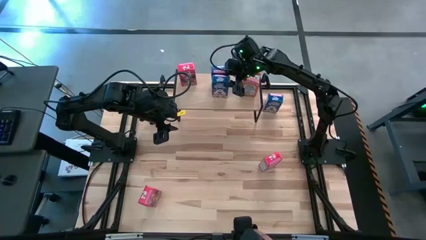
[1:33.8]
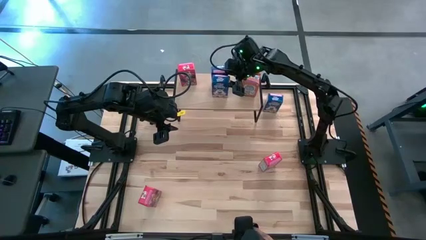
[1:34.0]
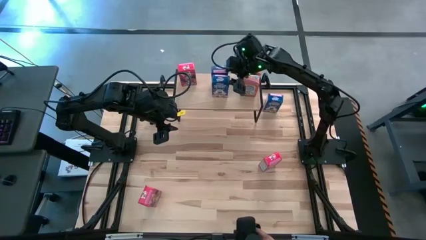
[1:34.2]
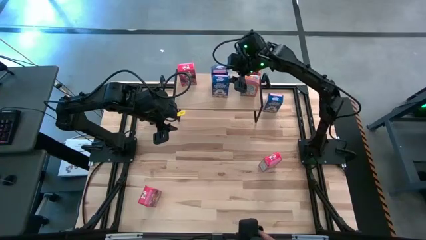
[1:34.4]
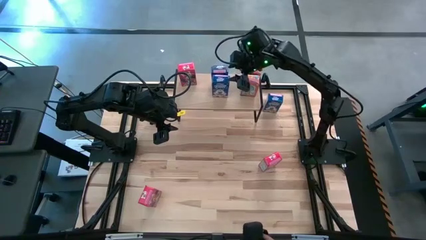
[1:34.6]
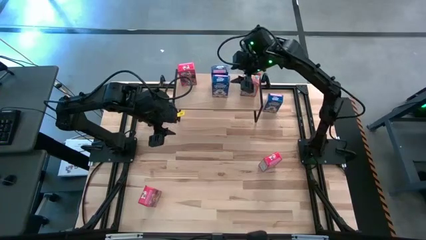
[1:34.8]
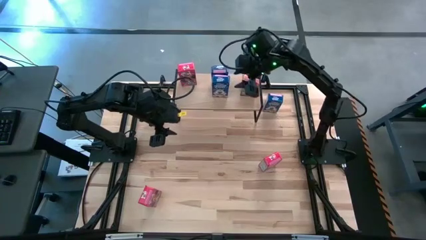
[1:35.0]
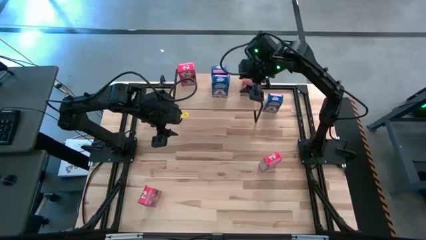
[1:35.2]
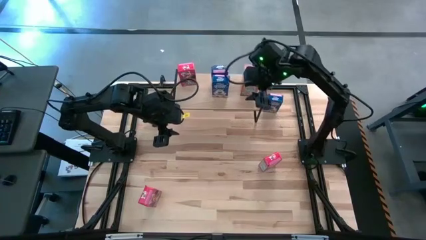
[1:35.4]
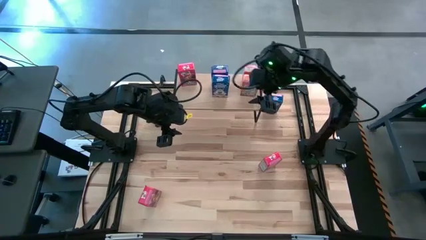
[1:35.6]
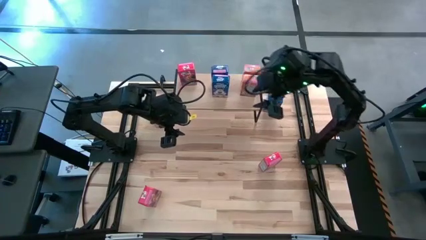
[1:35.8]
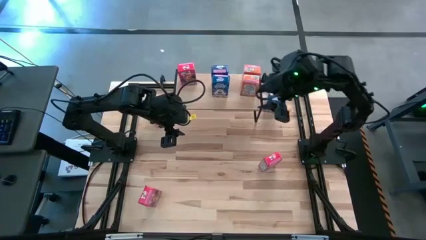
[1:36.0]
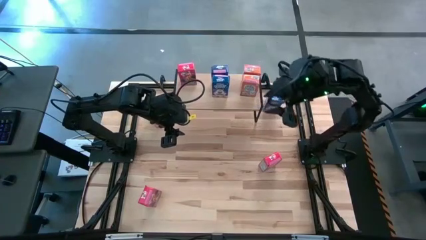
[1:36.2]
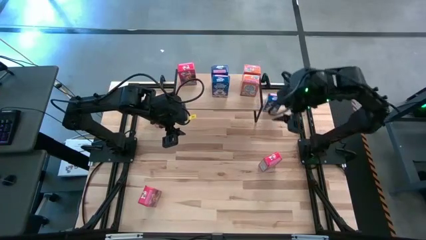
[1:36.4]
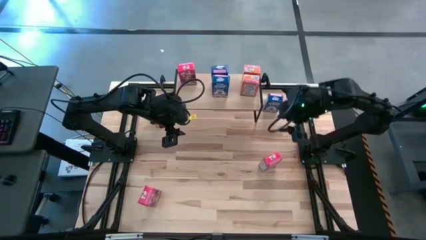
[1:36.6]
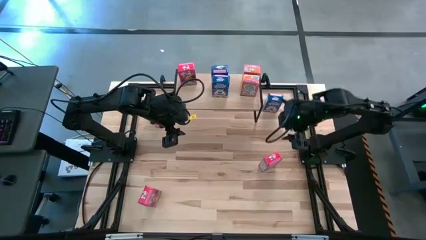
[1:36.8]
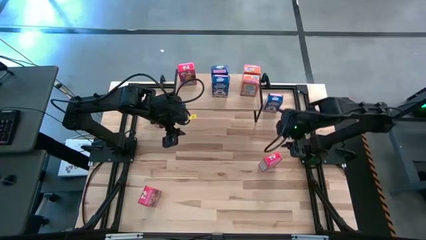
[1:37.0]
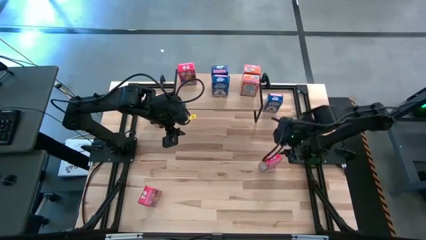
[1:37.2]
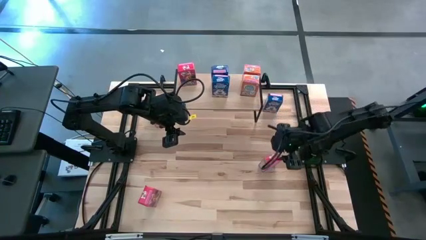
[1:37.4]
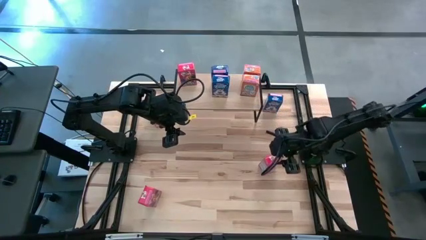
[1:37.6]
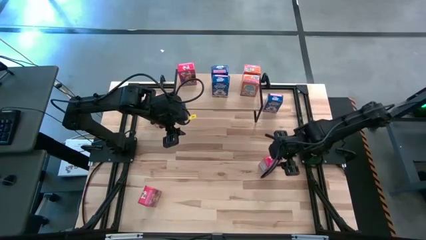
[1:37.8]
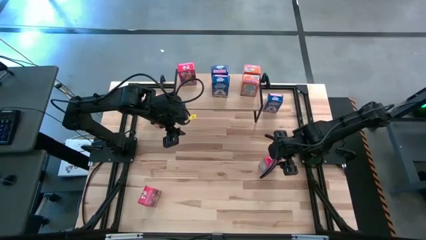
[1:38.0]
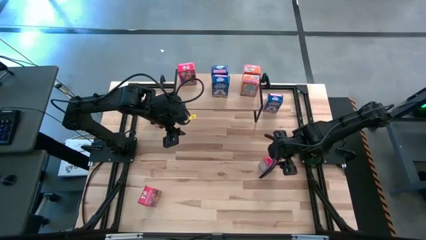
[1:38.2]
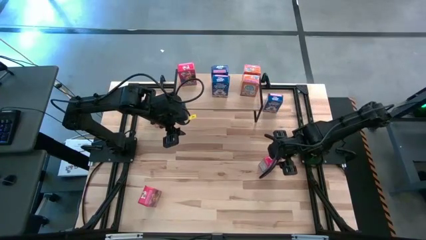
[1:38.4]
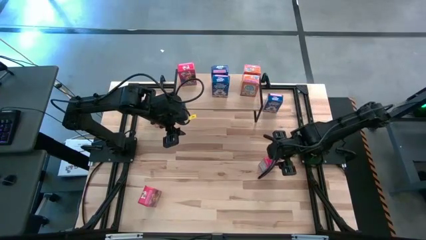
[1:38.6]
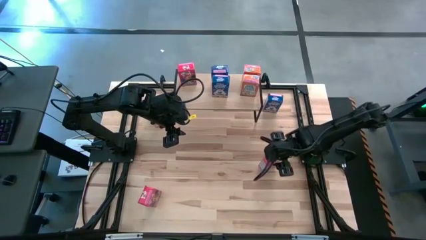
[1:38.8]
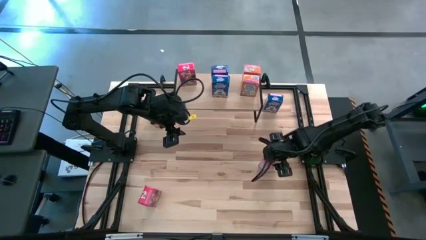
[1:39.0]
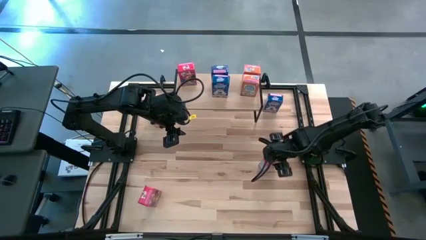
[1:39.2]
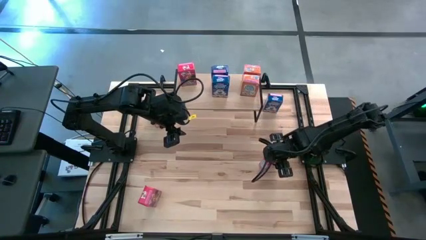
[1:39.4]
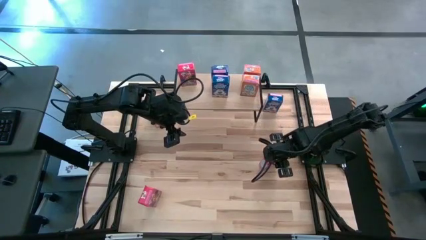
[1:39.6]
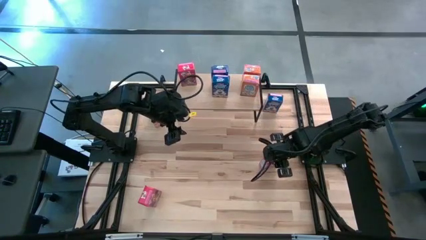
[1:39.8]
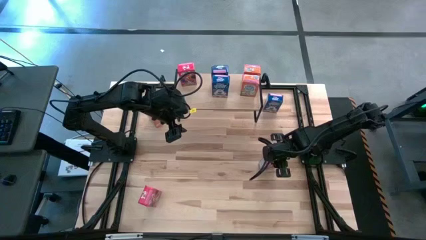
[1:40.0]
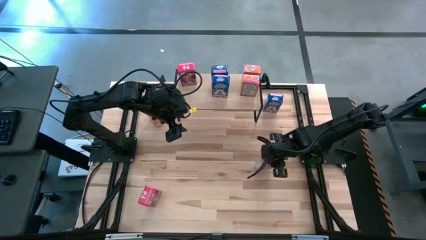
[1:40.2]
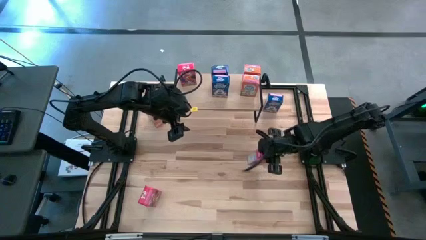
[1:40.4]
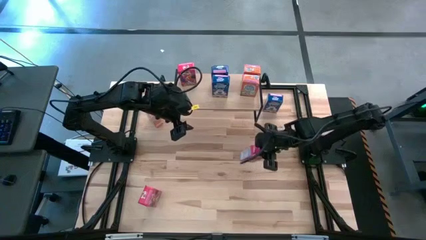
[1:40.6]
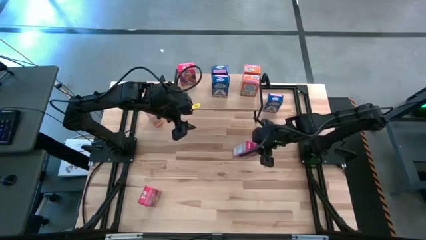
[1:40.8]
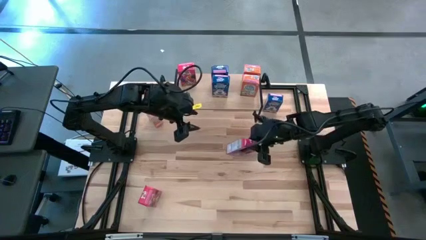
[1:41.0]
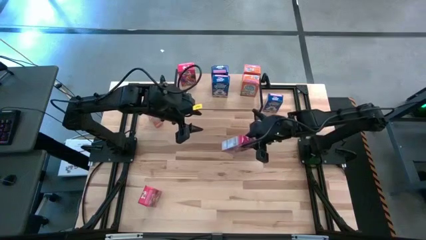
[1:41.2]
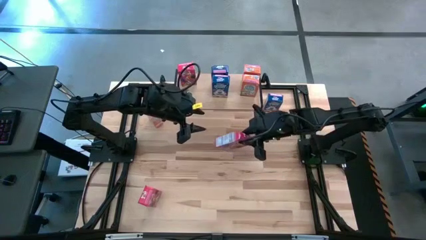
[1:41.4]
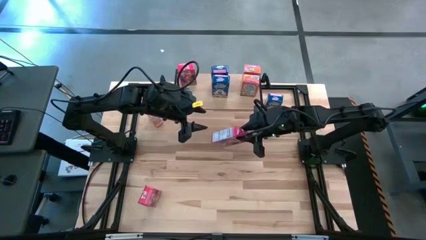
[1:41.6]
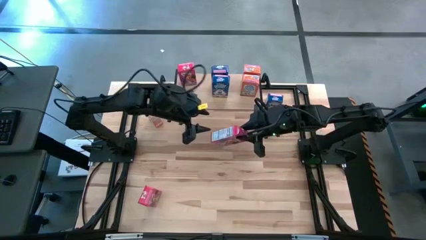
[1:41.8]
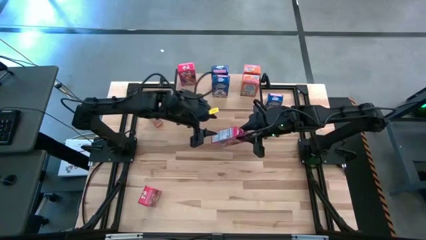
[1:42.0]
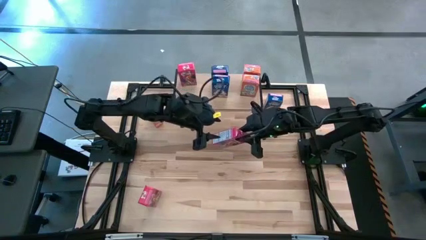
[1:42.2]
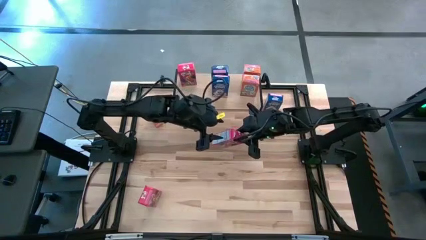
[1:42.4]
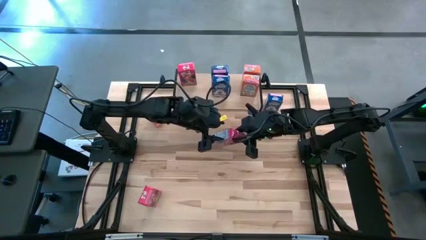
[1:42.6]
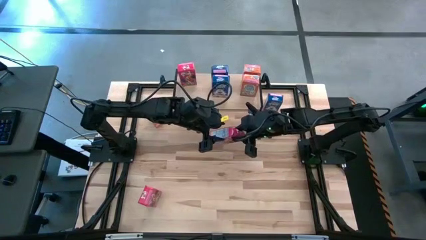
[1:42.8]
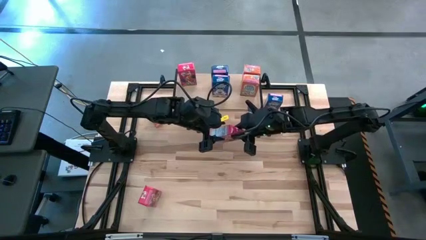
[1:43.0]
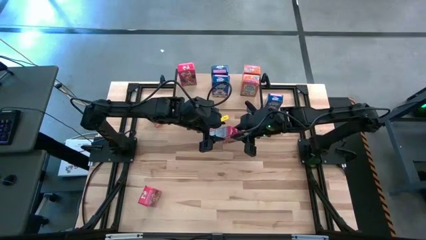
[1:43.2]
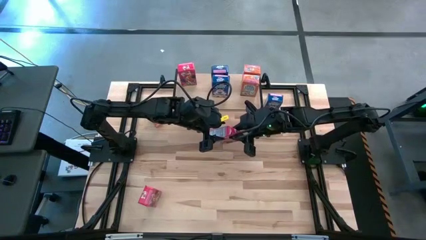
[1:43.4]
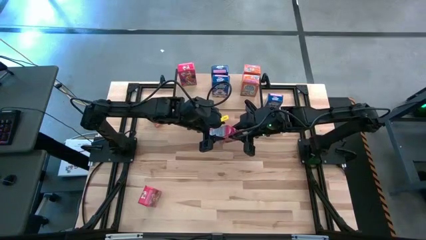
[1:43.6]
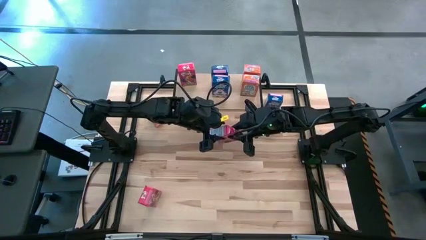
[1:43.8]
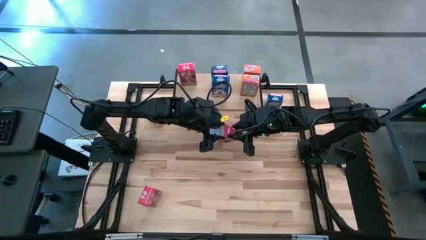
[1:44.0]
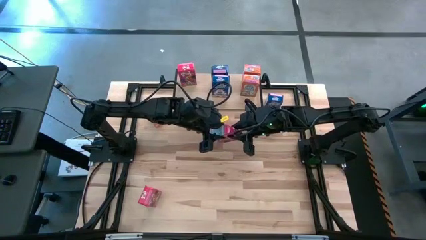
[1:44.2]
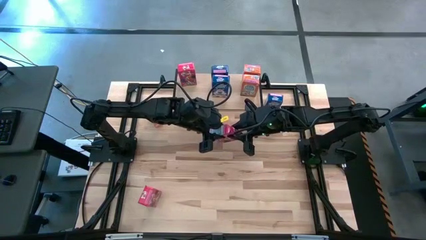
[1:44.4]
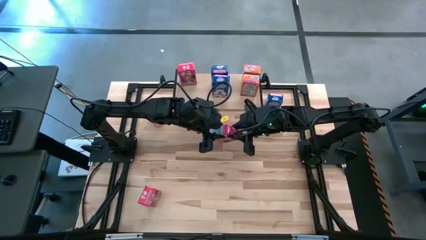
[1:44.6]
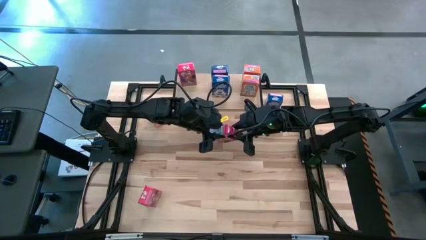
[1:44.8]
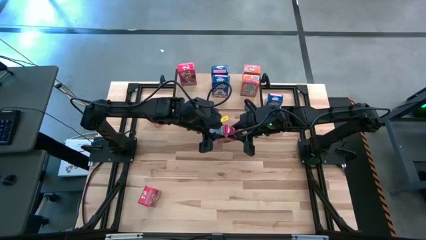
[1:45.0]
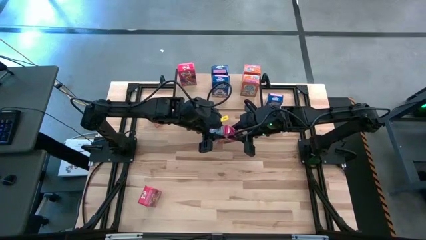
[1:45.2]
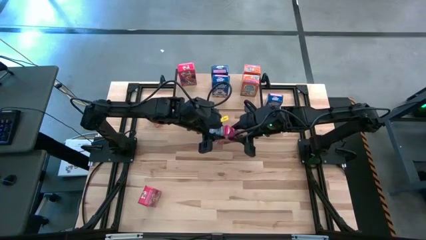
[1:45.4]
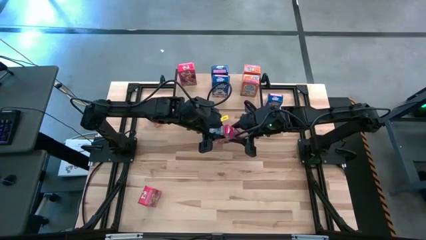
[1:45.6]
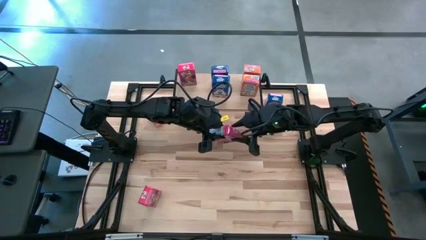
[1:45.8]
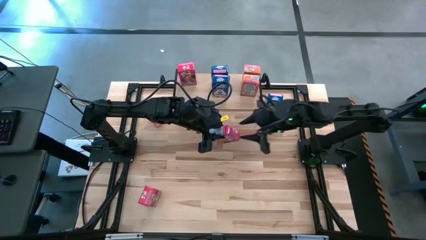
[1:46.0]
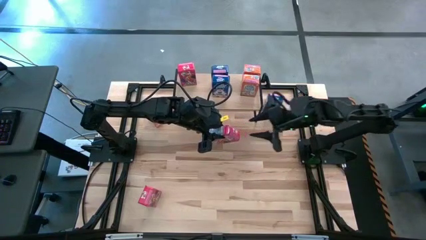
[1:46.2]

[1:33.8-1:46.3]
Task: Stack cereal on shelf
Put the right red cereal box on the shelf

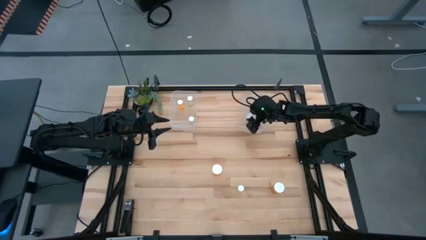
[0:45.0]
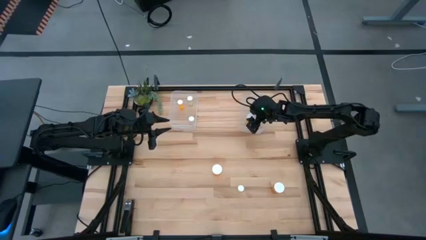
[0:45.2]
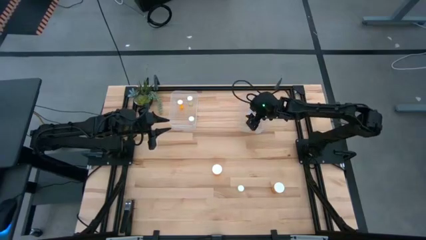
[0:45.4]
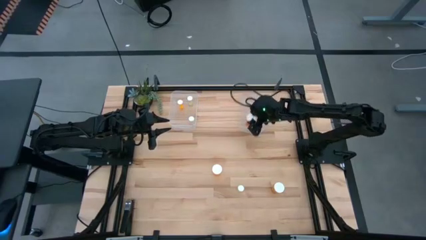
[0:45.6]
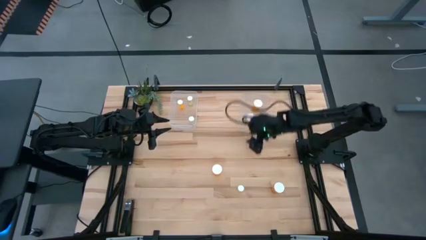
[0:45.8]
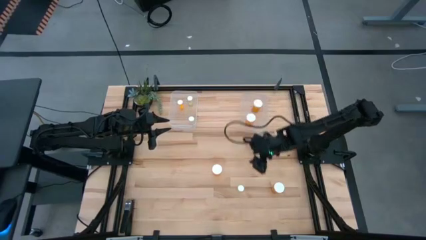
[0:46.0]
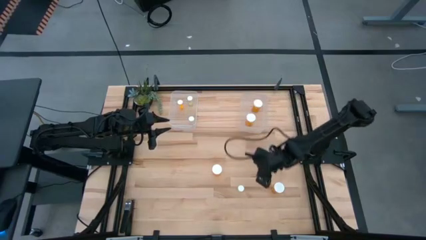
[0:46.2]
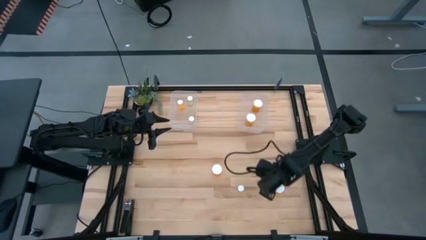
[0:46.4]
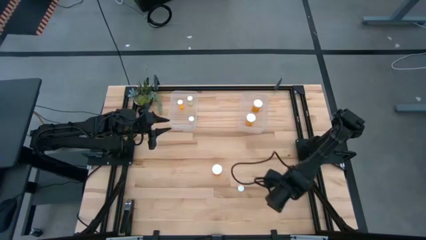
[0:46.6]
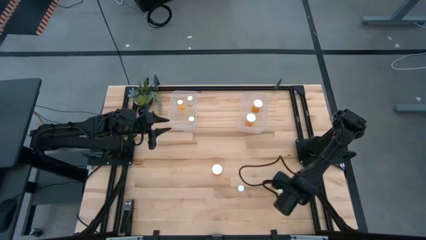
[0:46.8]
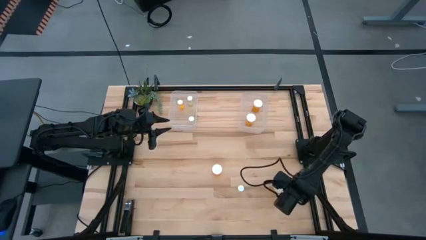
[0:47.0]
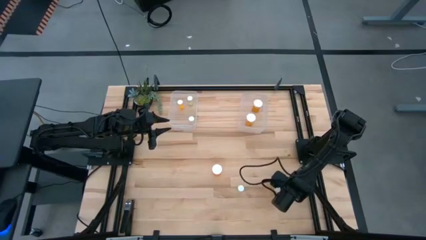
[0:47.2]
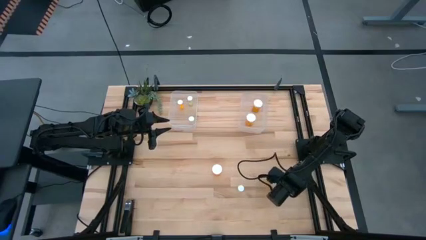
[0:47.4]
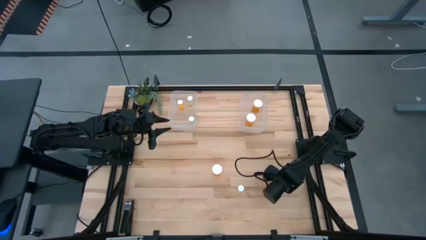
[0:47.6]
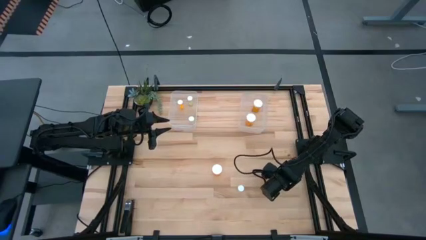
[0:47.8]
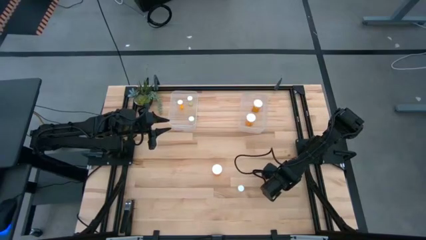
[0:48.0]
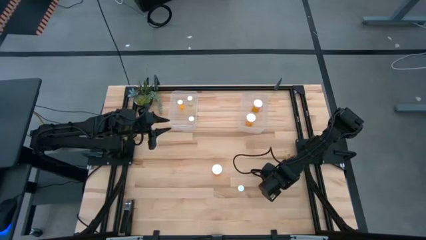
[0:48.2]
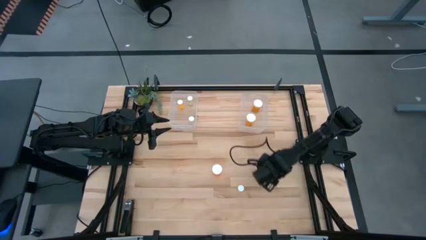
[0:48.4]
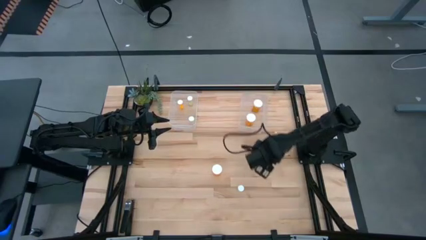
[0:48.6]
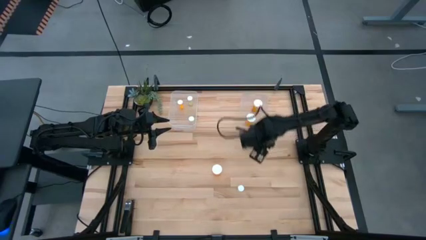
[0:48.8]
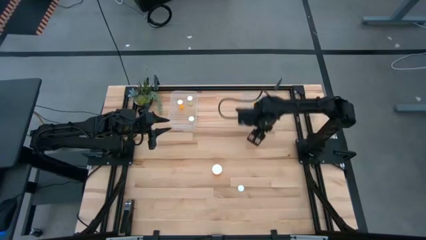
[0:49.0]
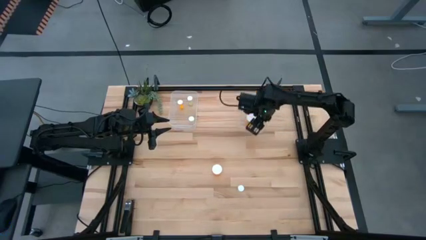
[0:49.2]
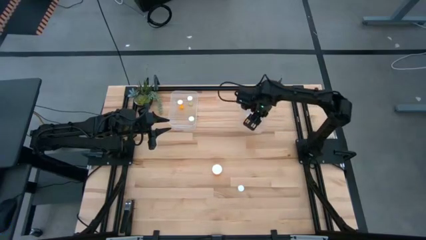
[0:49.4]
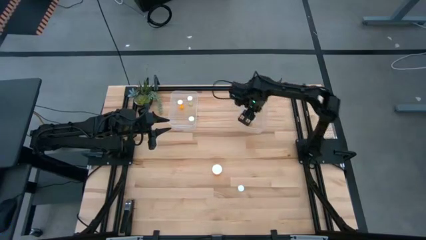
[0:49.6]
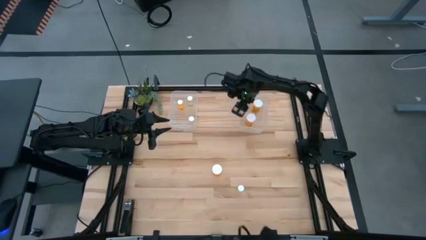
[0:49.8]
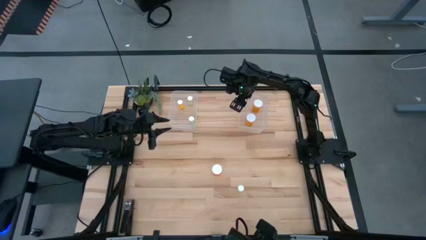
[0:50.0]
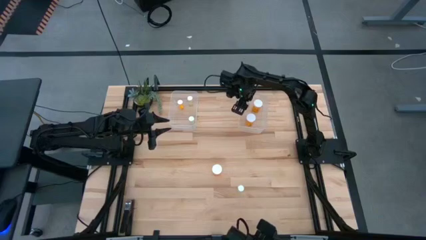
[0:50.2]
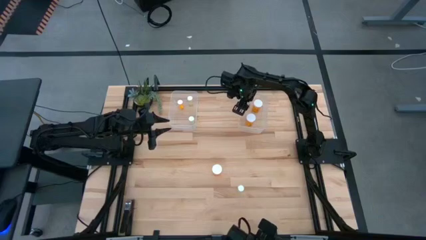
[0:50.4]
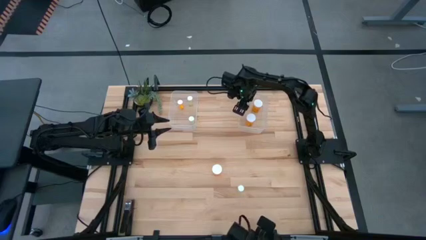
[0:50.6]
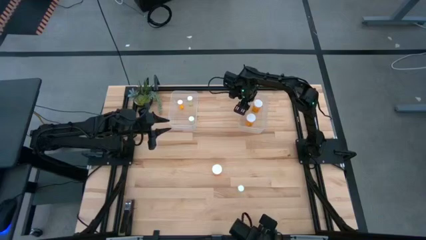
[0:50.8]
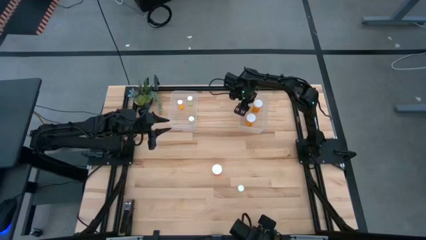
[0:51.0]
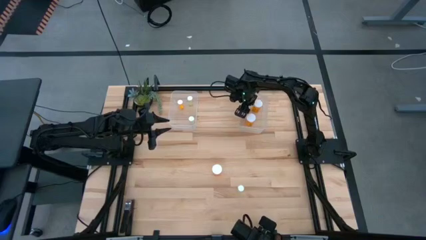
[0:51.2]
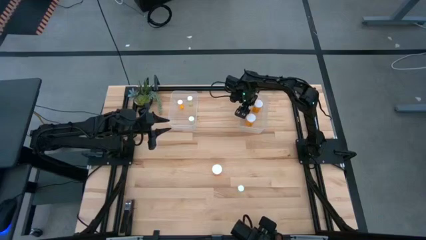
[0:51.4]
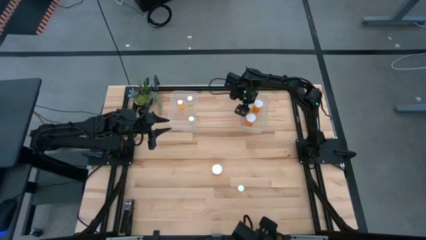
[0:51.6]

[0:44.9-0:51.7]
Task: Pick and place medicine bottles into bin by pill shape (circle, oval)
Put the large orange pill bottle into the right transparent bin
